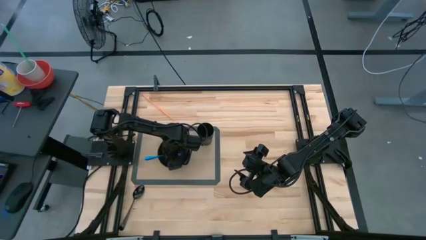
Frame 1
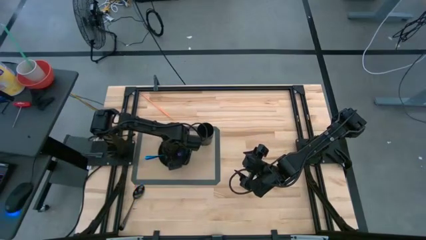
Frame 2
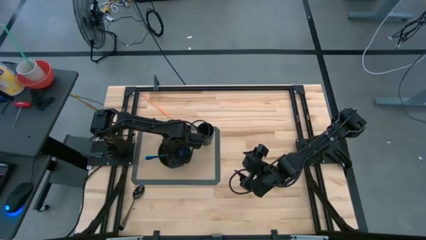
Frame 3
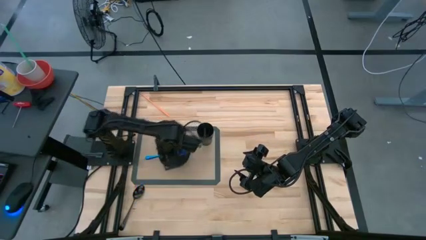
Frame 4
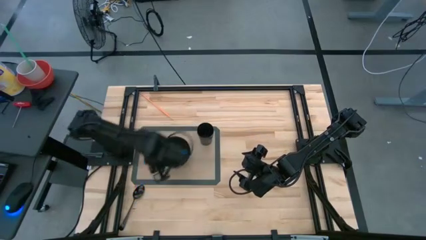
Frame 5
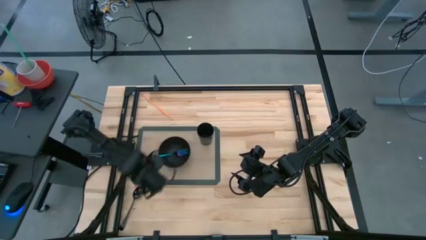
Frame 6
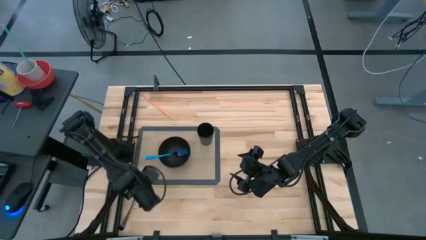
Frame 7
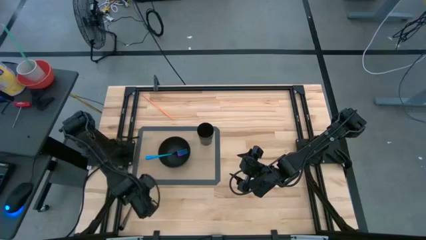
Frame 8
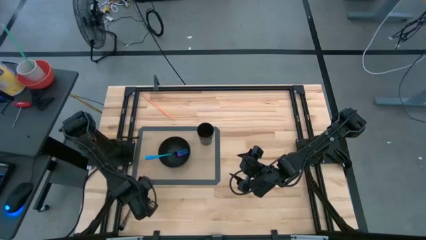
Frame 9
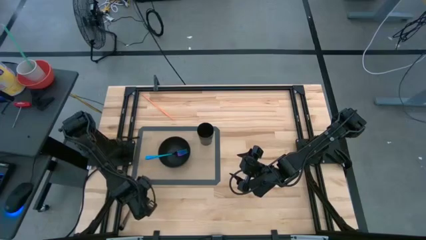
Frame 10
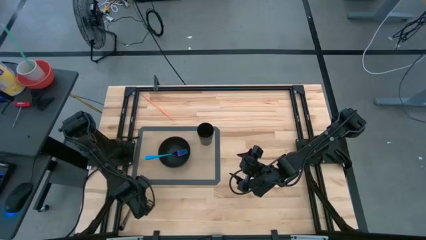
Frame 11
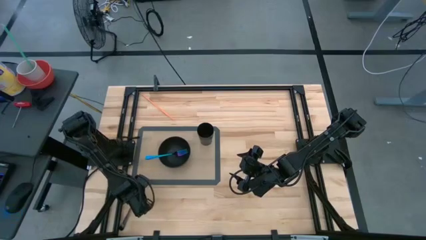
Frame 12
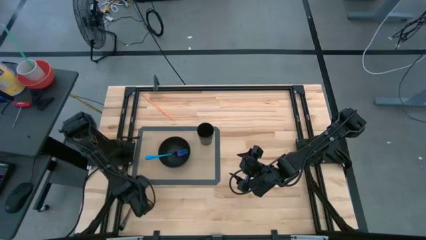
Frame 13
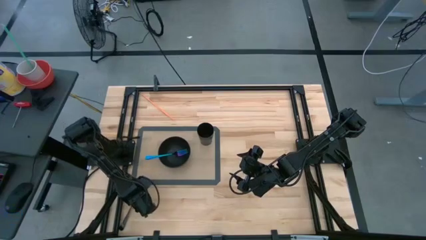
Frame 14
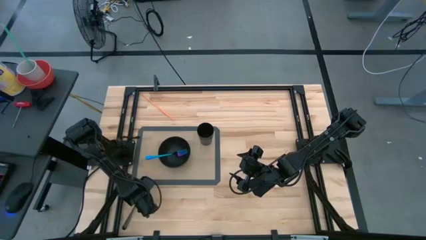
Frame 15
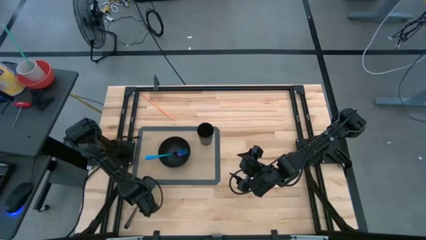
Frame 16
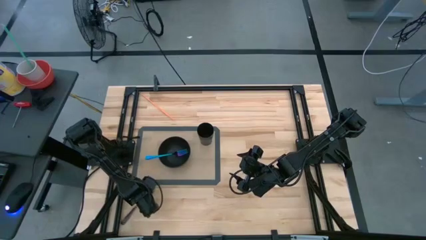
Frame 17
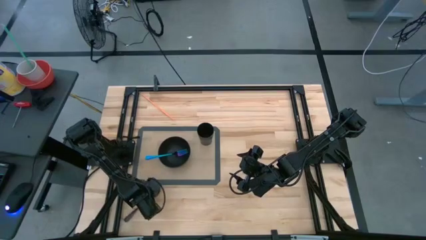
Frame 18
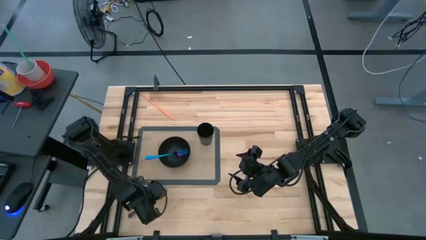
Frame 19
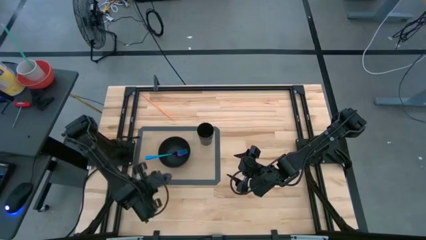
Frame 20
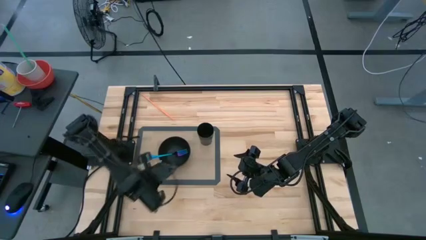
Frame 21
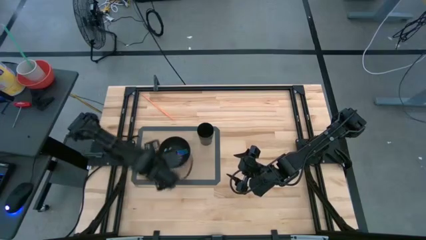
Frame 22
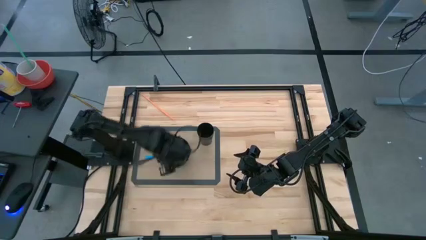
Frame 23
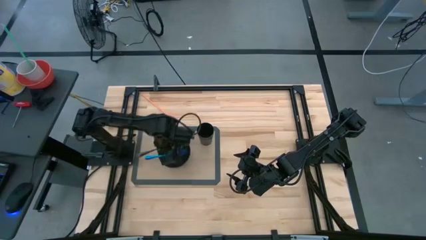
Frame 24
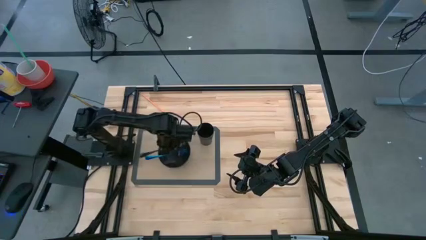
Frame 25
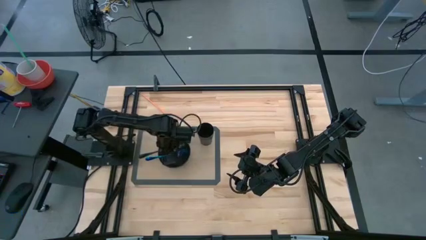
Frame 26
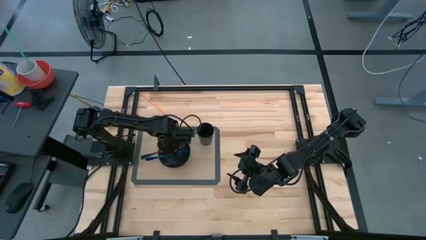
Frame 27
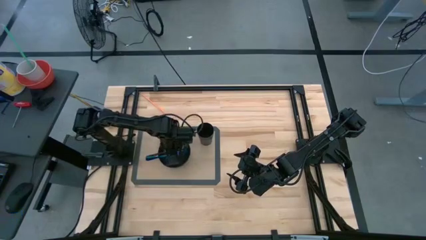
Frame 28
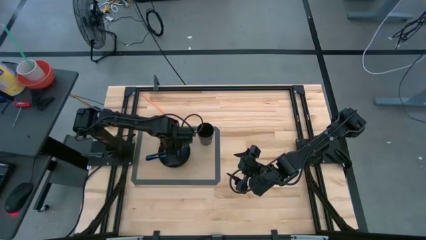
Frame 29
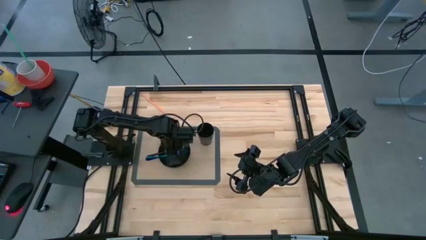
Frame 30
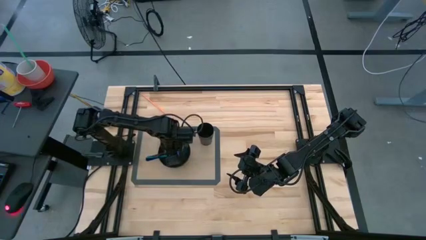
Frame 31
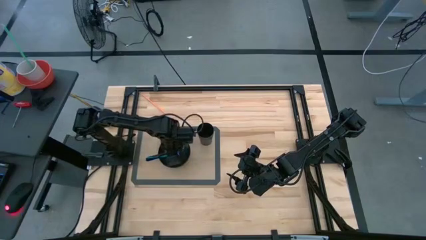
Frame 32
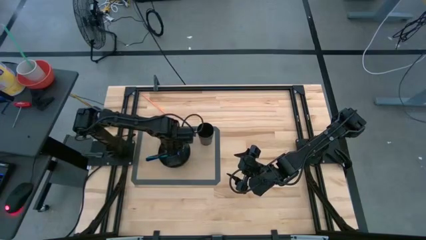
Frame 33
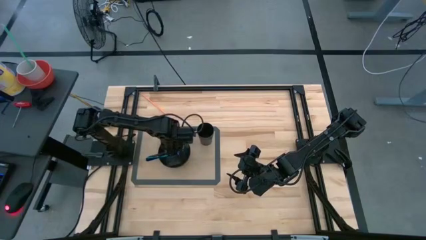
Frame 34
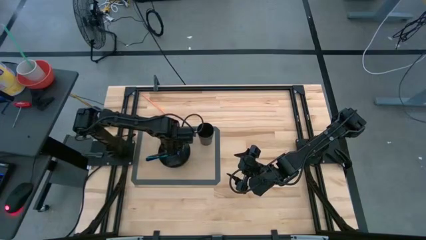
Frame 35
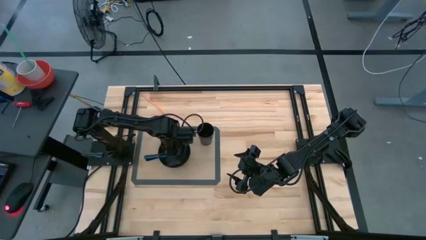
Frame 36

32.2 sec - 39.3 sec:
Task: Pick & Place Utensil
Put the black spoon into the black bowl on the transparent table mat

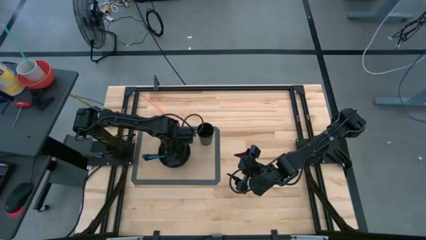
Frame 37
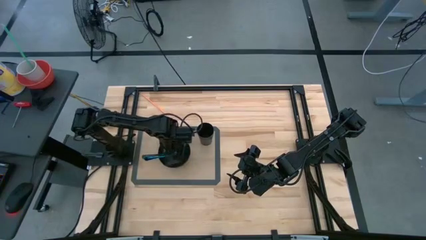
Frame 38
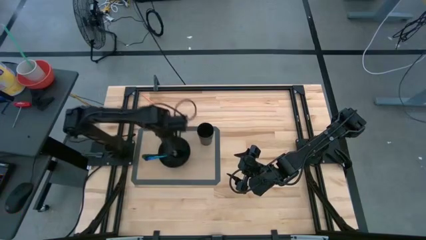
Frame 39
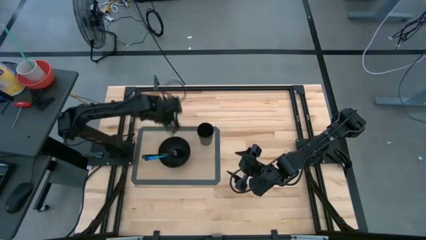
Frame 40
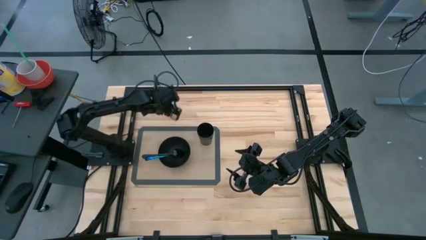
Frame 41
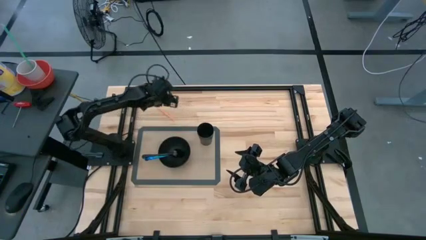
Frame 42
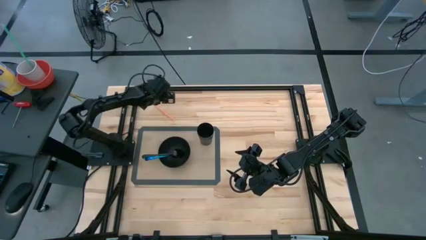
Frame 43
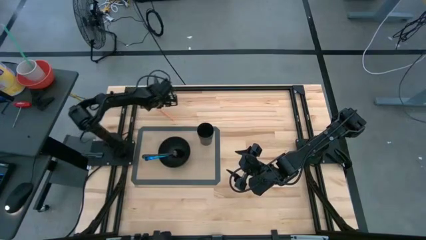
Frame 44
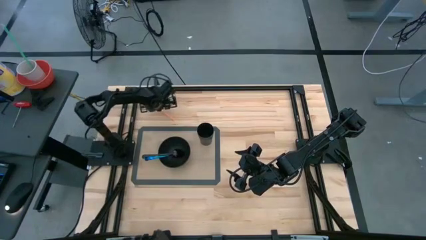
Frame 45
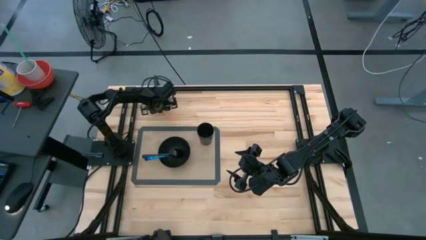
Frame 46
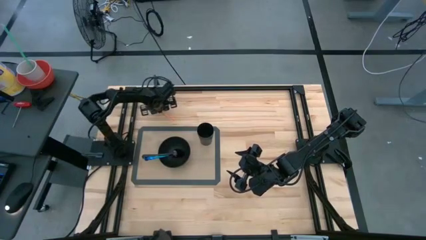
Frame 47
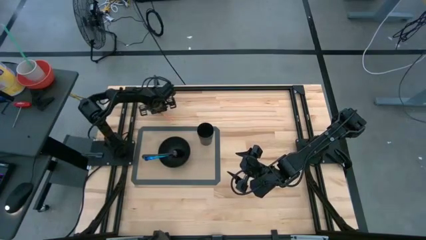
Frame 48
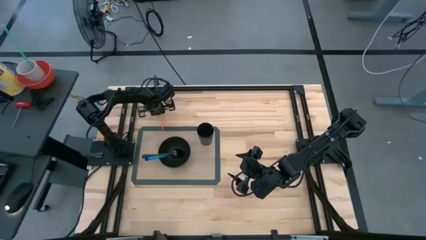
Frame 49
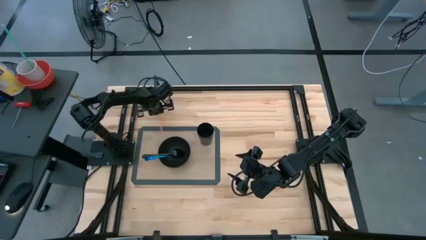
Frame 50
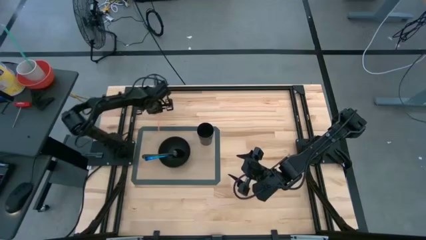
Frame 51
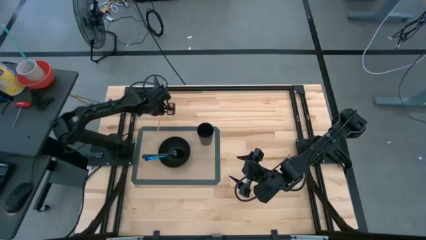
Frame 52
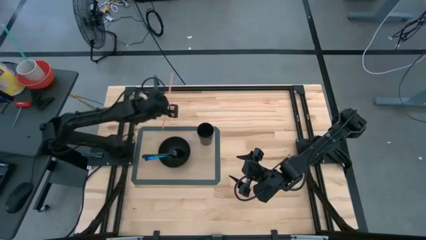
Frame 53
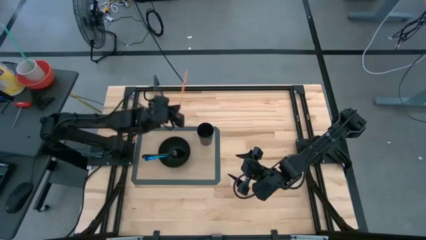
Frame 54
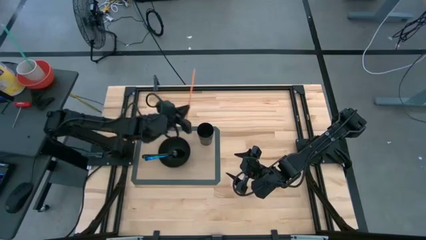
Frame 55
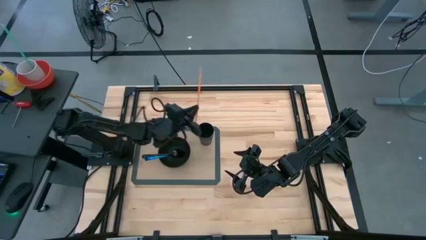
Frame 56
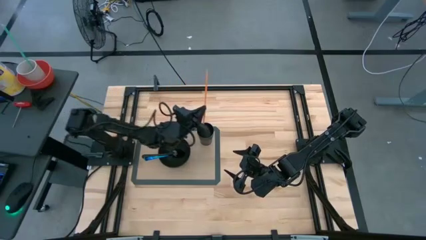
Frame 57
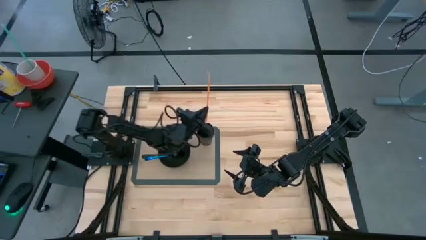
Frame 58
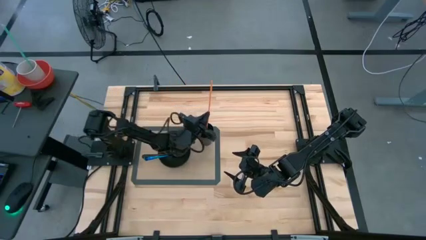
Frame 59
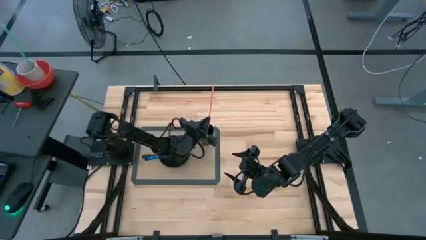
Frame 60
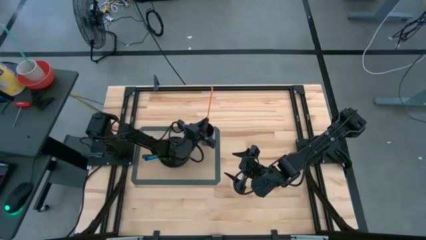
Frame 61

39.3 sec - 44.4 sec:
Put the orange straw into the black cup on the transparent table mat

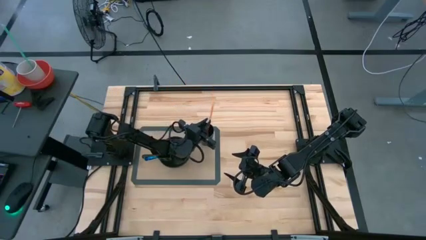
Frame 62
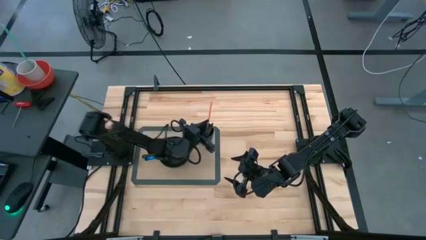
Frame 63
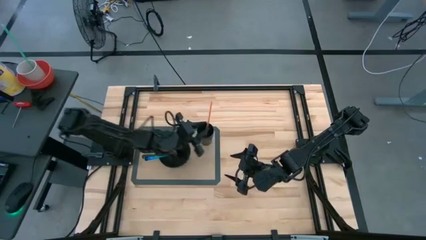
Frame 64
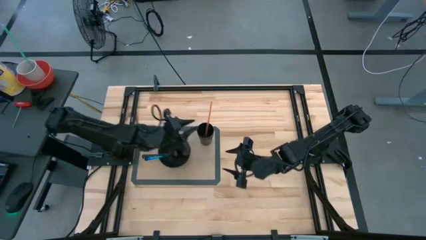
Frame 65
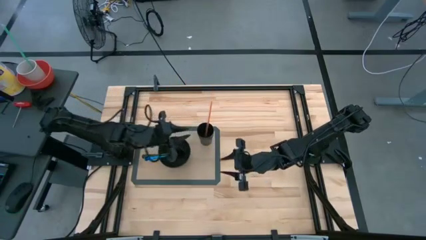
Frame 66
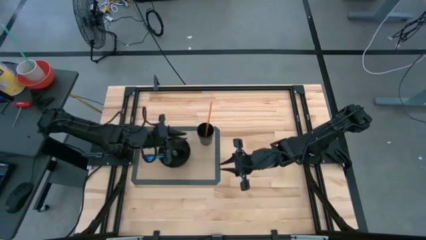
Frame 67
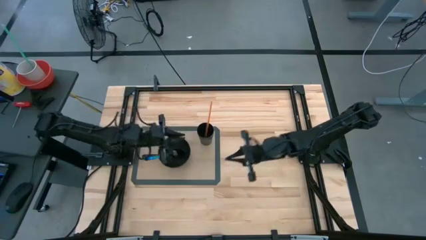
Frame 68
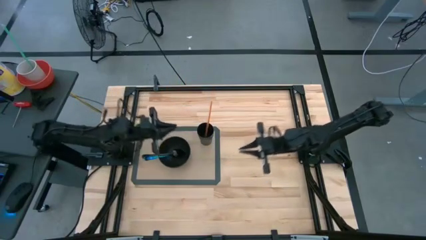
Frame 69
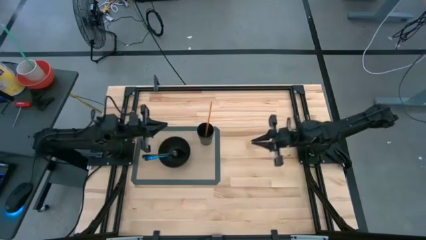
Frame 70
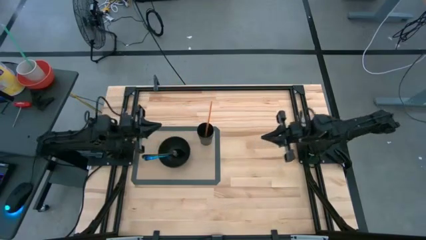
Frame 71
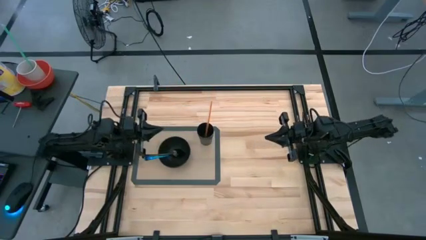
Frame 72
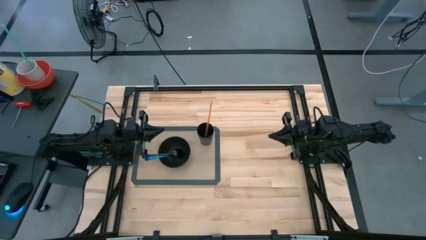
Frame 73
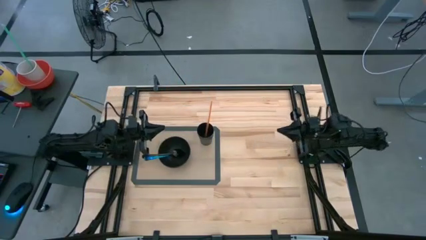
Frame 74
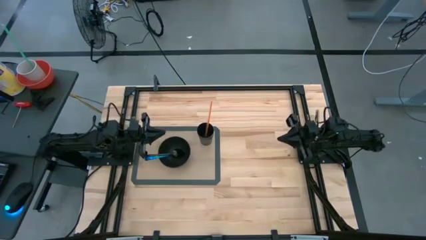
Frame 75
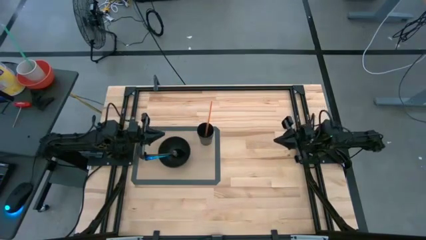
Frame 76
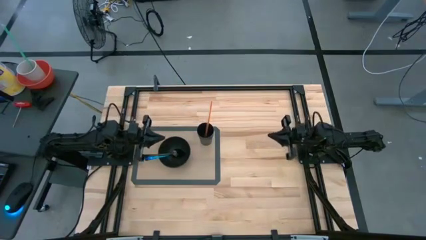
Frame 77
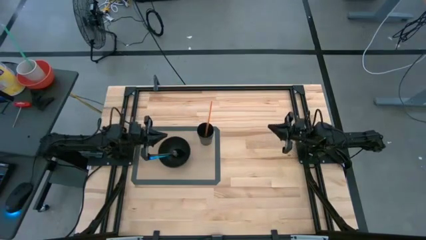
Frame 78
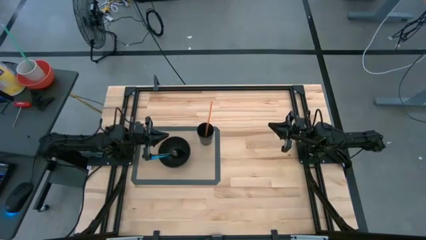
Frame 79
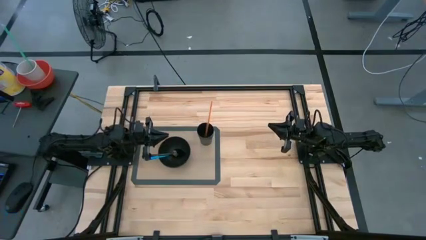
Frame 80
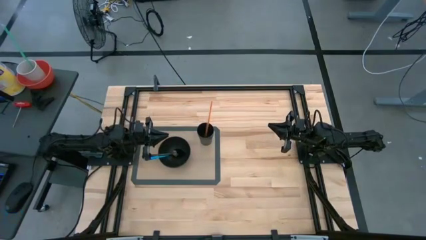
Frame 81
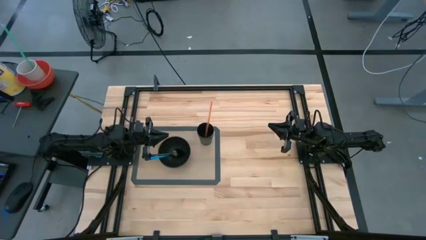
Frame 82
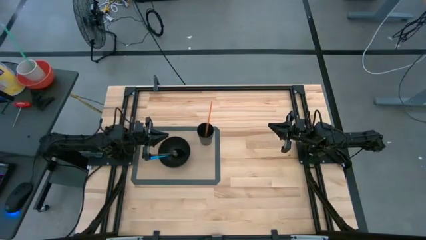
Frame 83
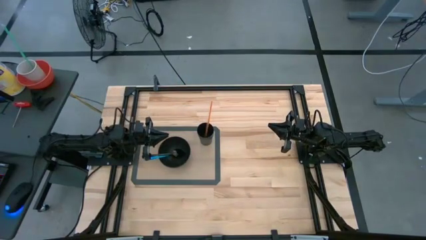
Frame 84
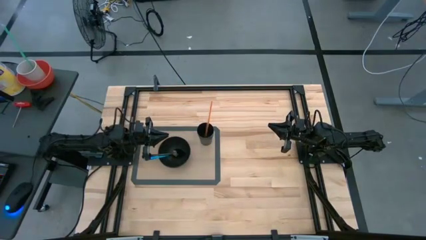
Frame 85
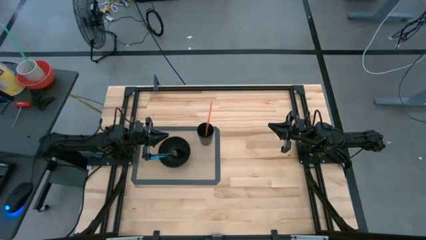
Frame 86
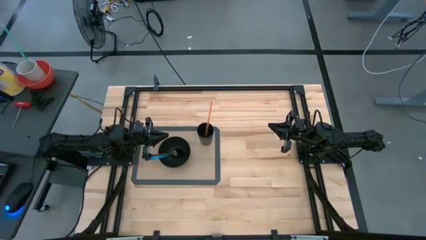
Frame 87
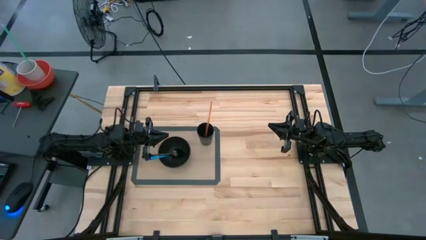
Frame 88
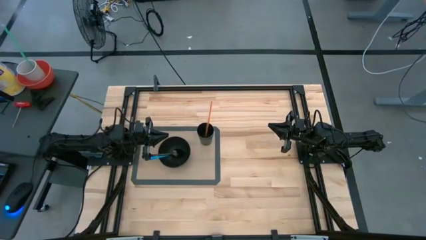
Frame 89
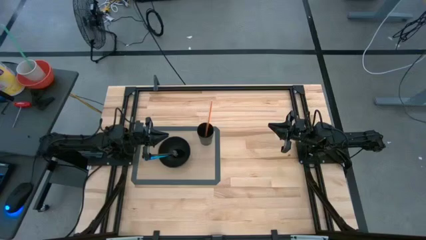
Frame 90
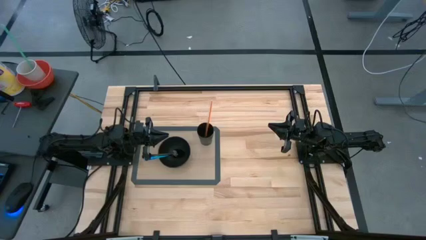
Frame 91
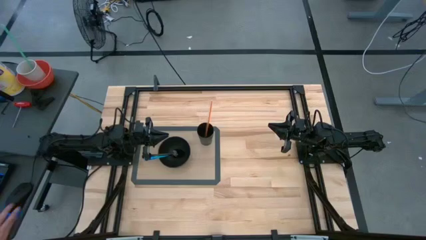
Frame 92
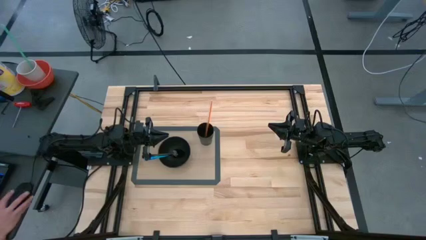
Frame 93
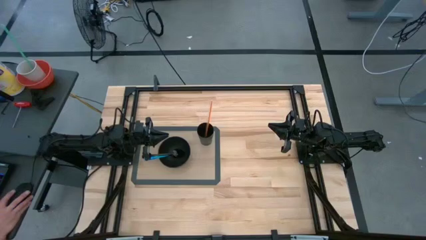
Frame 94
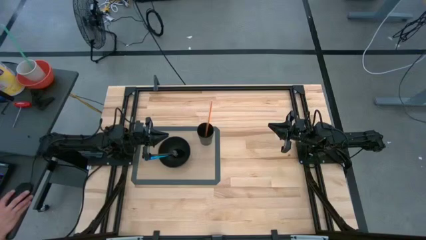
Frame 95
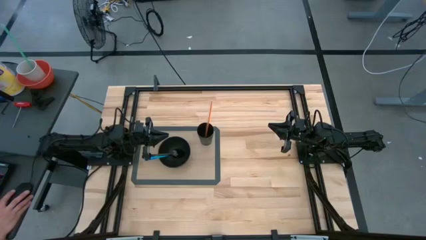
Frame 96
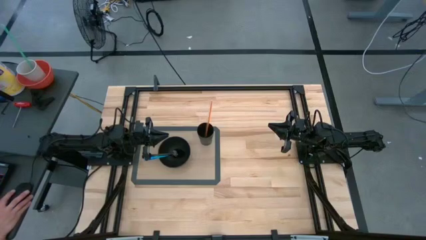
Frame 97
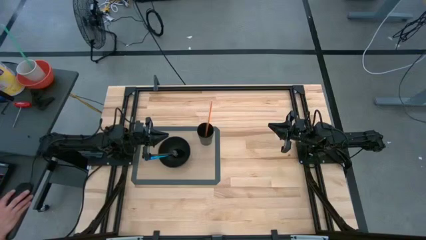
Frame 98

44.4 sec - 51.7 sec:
Return to Home Position
